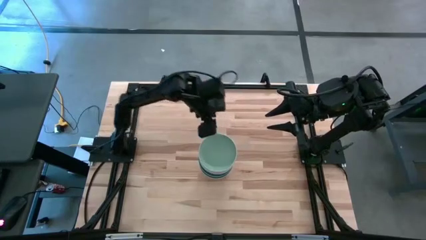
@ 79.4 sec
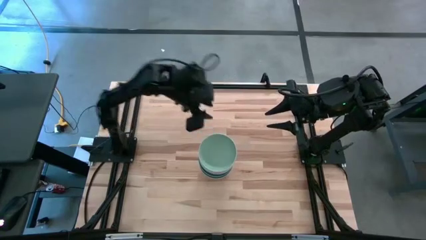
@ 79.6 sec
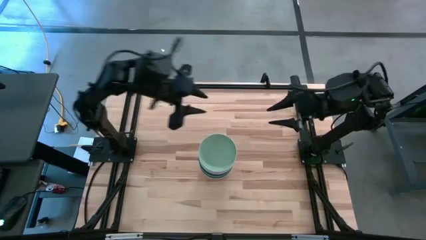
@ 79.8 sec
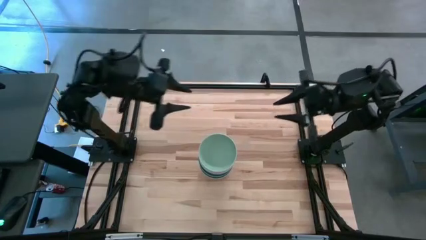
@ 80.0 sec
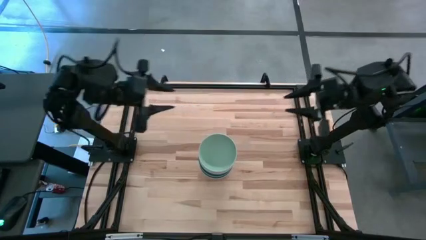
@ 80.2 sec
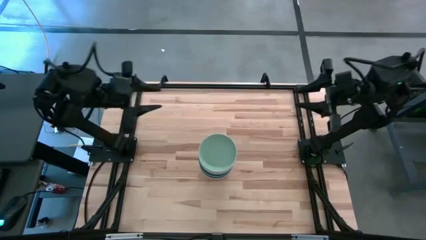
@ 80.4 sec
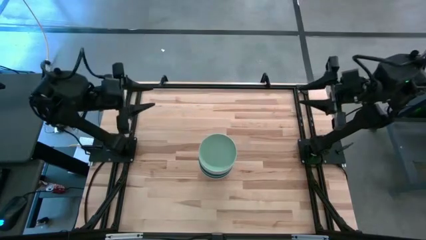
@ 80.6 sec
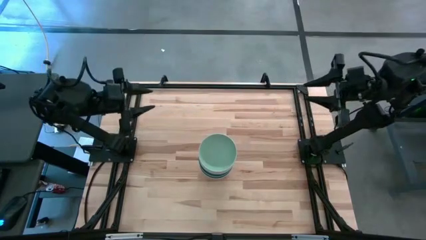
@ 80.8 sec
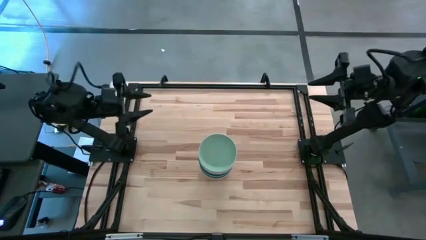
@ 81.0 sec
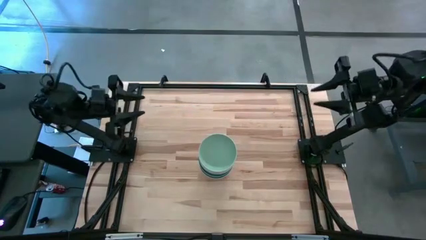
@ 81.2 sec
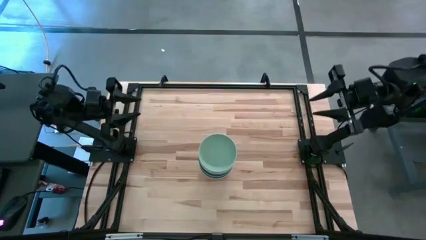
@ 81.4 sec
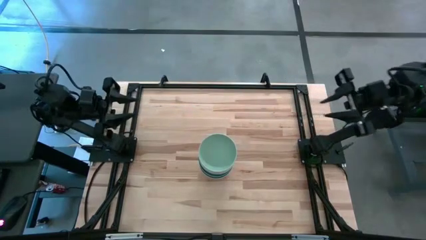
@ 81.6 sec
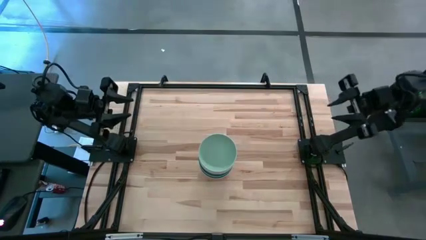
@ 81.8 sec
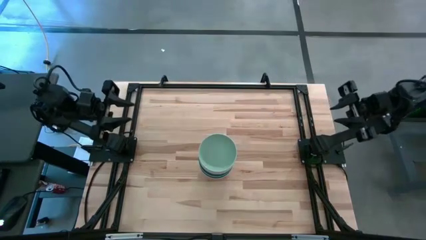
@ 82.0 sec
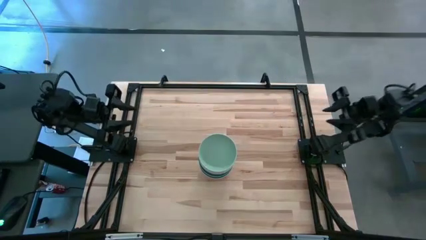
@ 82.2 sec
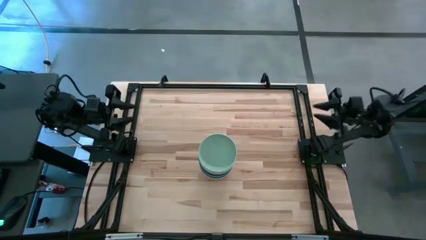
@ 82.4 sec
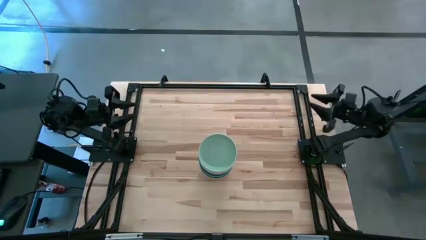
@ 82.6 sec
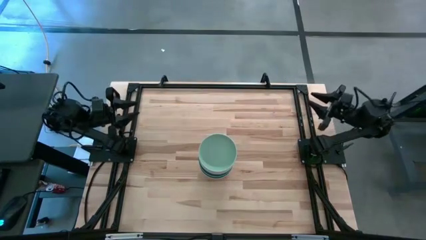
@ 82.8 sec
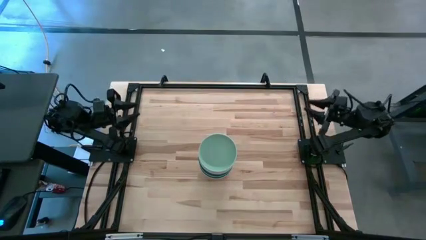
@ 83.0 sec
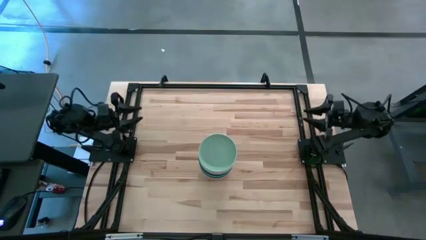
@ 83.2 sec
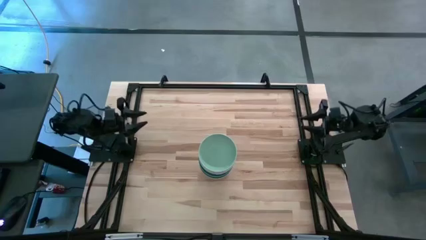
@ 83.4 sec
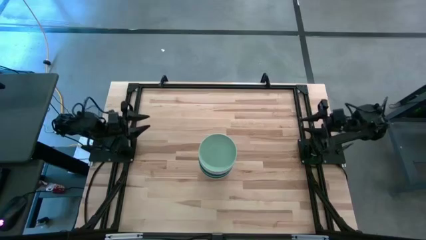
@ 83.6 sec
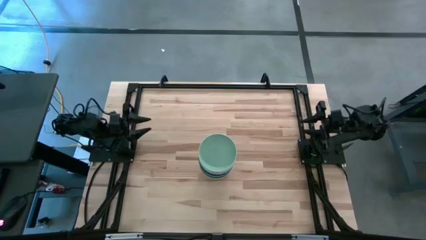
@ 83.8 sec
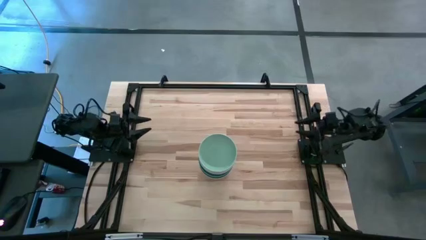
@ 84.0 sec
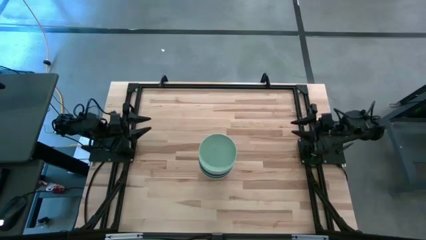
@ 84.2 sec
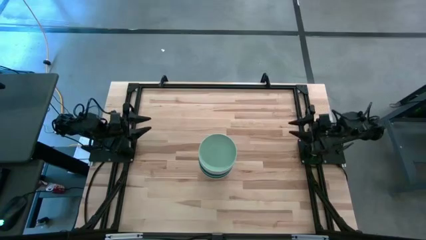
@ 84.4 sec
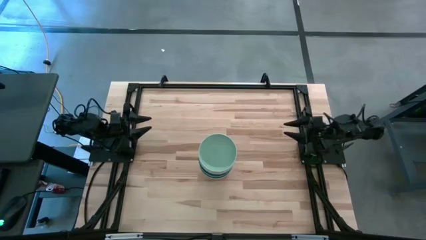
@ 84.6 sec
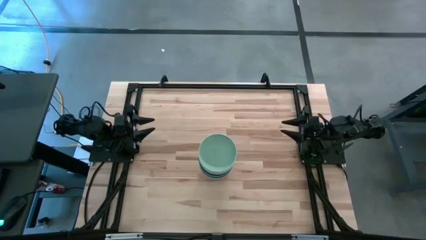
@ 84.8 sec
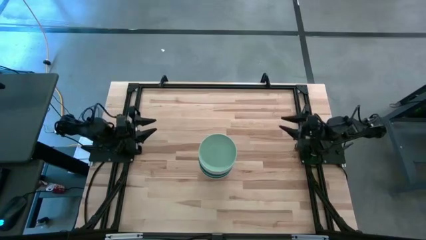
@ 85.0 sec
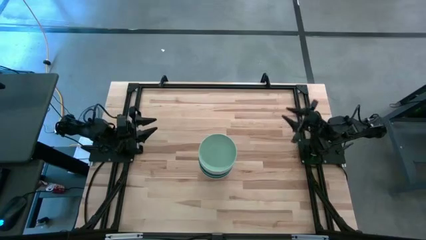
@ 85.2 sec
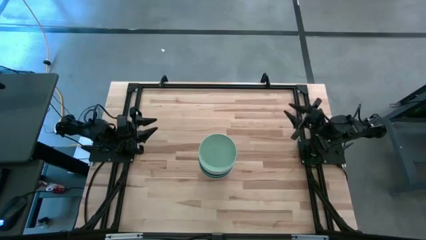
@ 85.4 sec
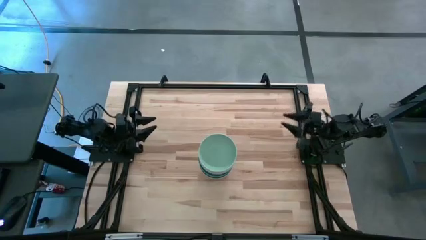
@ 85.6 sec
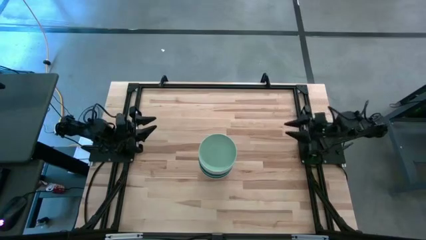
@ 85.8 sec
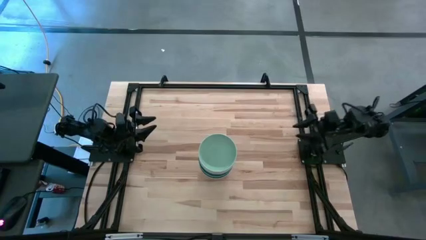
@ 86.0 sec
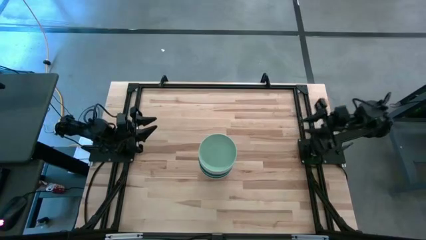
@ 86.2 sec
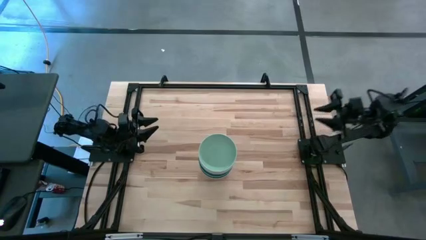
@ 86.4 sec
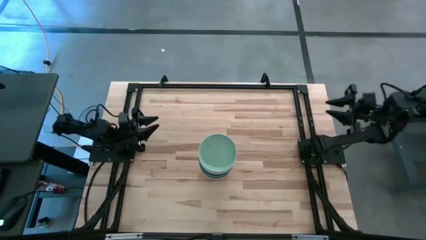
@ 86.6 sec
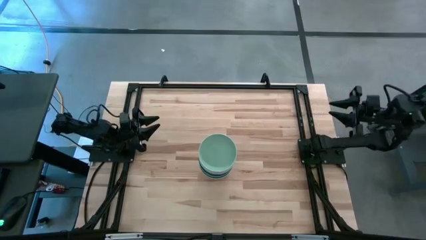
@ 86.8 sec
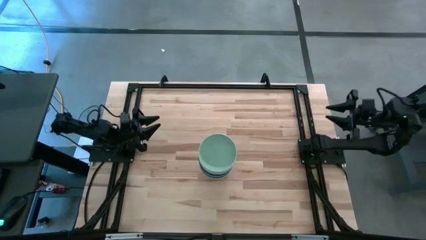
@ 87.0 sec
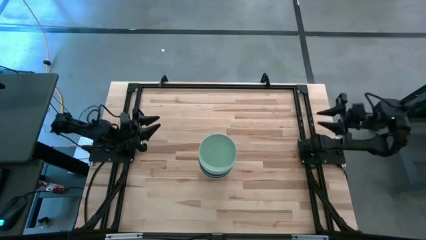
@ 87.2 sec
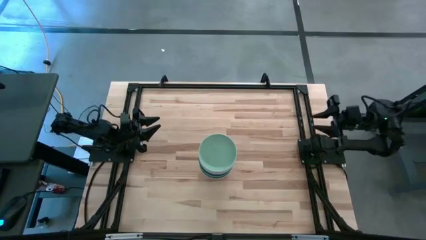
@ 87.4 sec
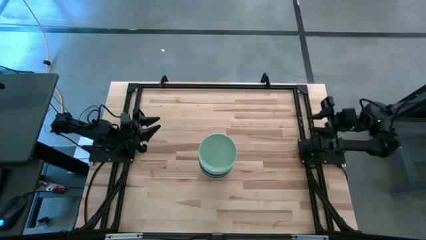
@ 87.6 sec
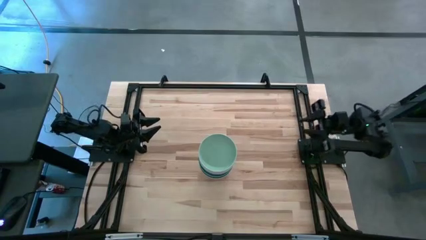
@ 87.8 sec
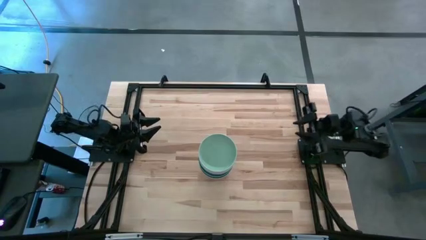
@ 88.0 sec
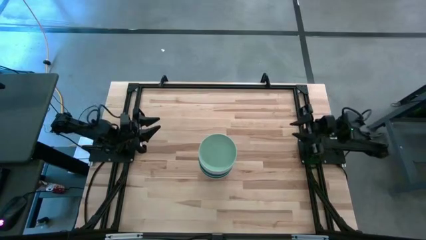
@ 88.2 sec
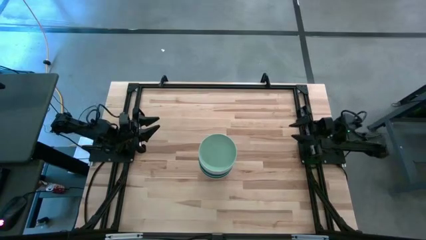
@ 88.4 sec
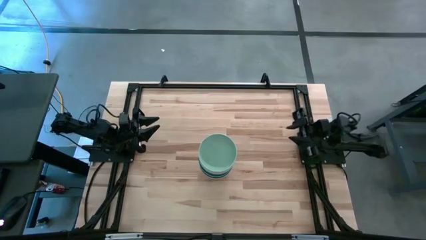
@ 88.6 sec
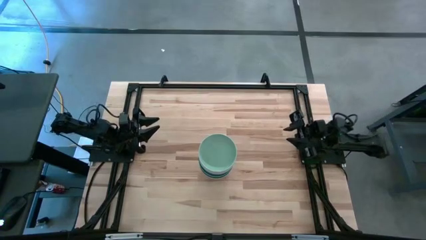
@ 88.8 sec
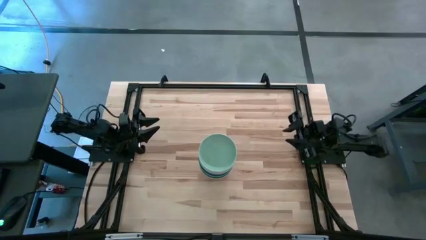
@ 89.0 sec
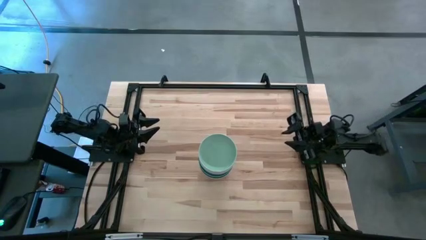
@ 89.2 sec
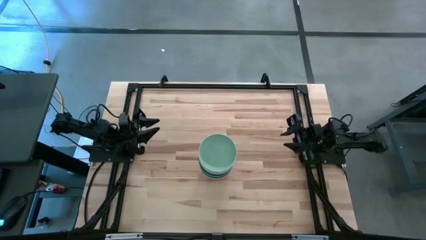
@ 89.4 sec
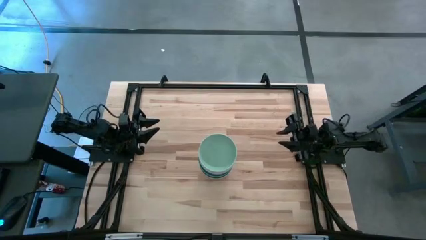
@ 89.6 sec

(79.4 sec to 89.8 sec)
Task: Nest bowls inside each other
Return to home position
